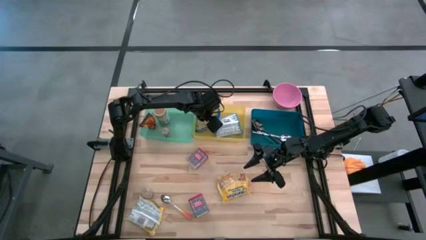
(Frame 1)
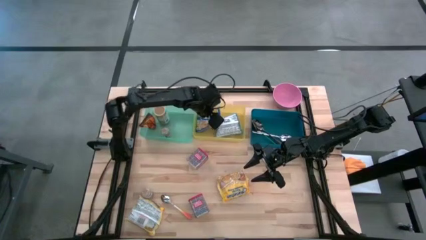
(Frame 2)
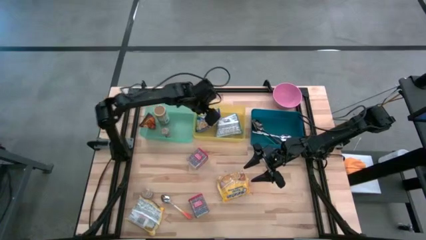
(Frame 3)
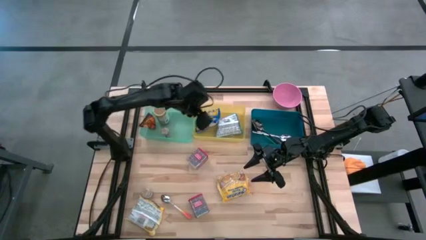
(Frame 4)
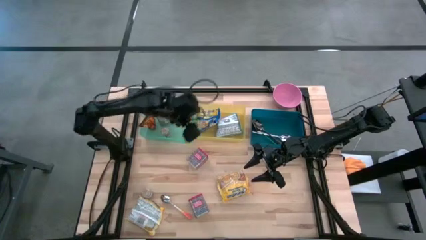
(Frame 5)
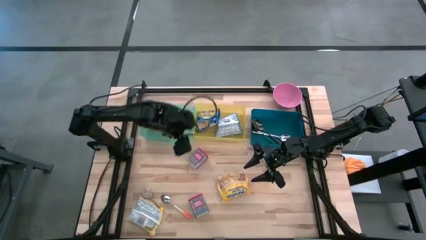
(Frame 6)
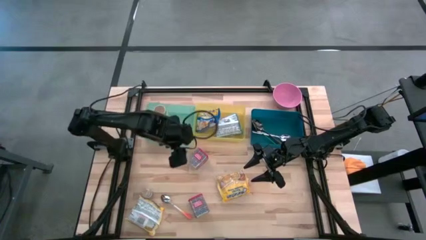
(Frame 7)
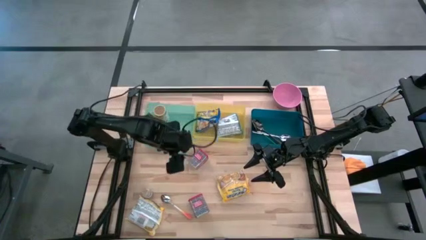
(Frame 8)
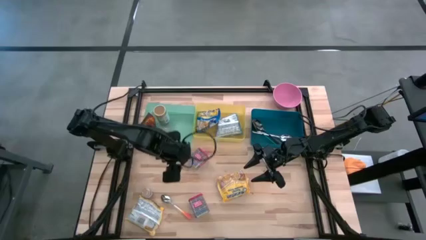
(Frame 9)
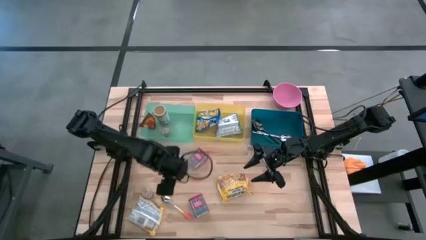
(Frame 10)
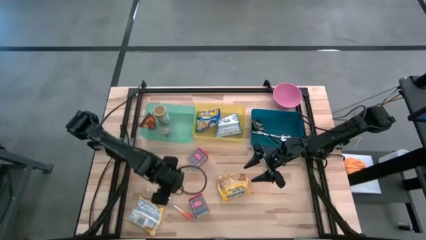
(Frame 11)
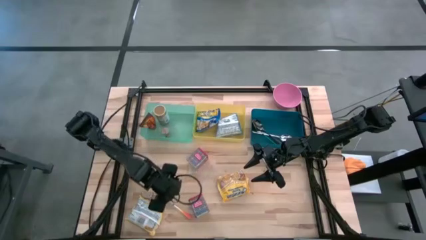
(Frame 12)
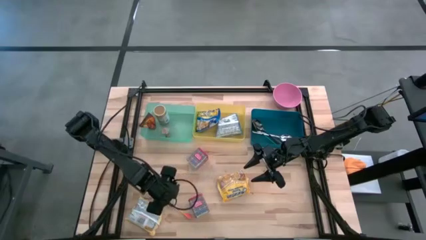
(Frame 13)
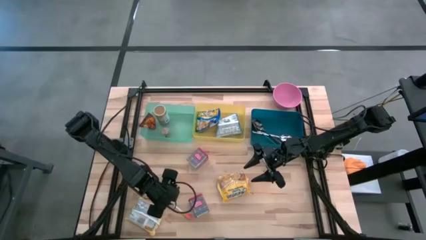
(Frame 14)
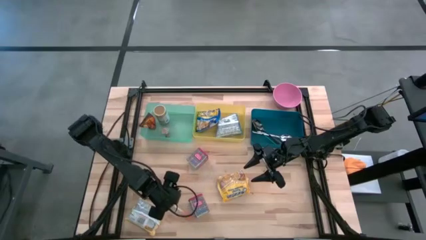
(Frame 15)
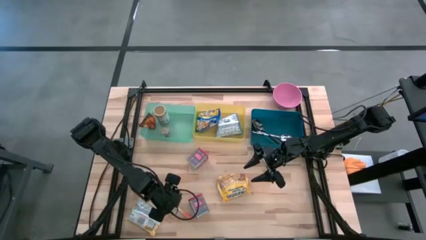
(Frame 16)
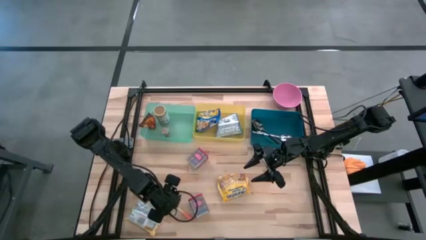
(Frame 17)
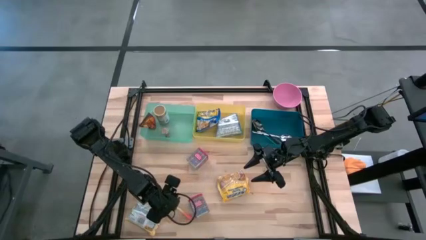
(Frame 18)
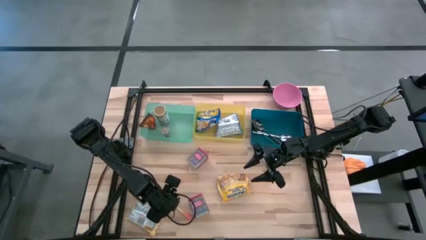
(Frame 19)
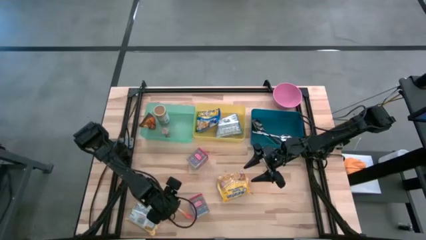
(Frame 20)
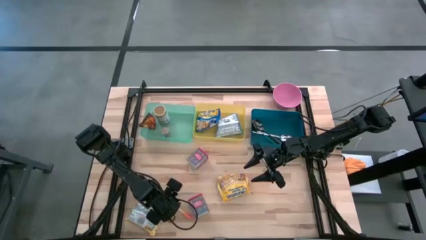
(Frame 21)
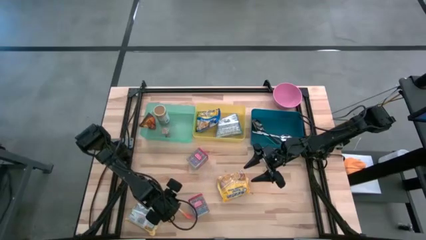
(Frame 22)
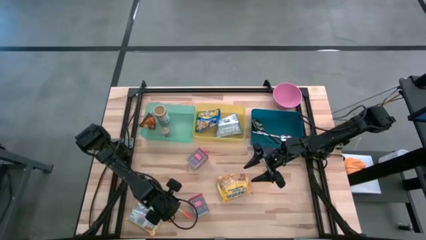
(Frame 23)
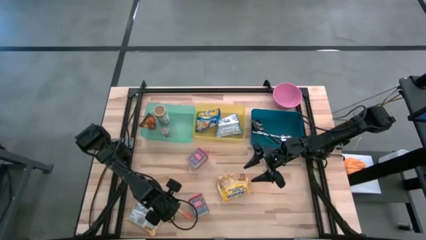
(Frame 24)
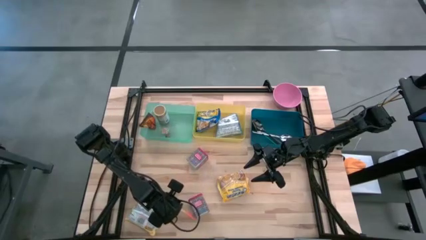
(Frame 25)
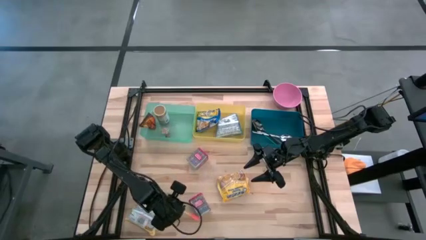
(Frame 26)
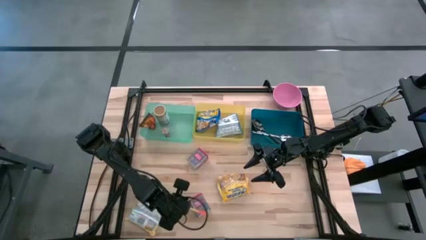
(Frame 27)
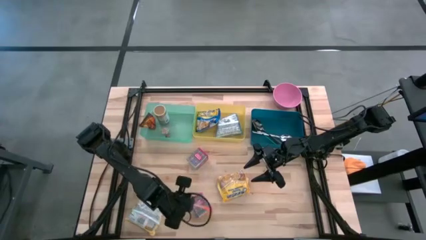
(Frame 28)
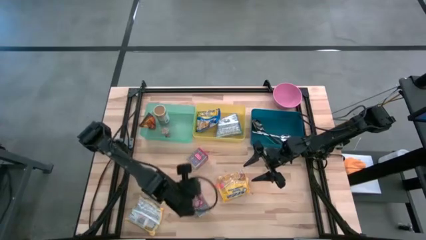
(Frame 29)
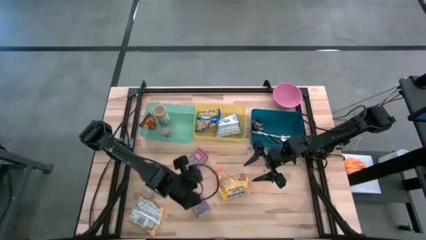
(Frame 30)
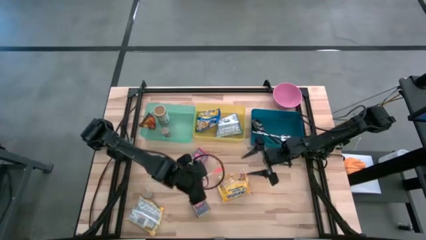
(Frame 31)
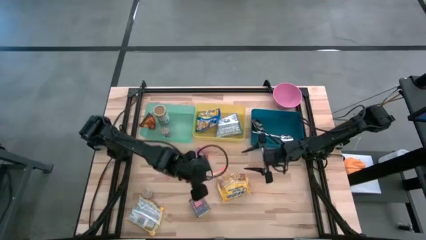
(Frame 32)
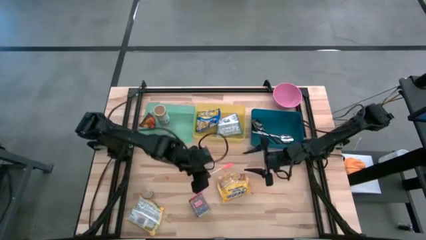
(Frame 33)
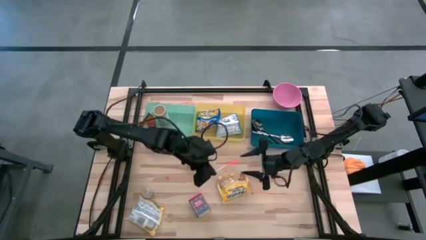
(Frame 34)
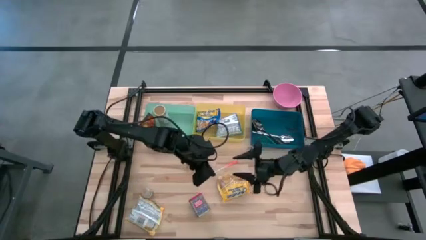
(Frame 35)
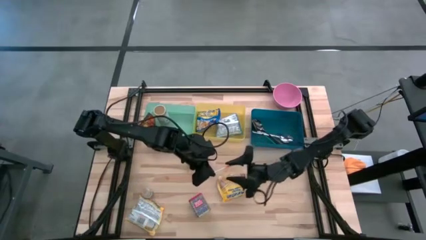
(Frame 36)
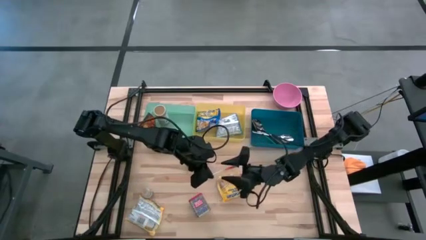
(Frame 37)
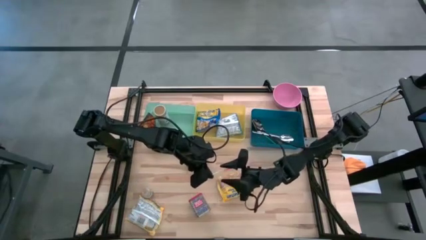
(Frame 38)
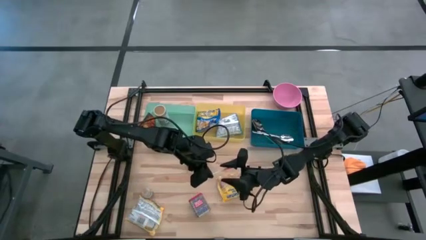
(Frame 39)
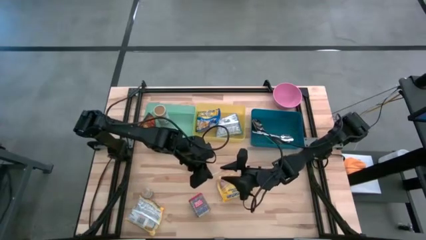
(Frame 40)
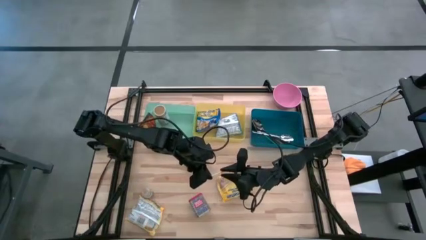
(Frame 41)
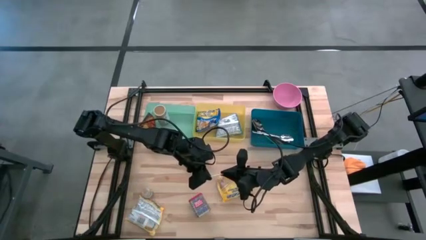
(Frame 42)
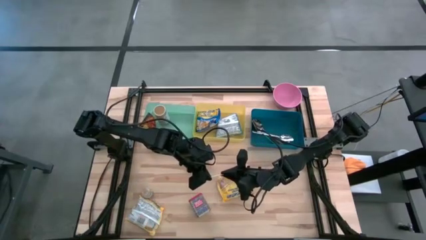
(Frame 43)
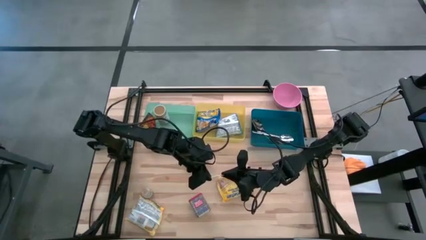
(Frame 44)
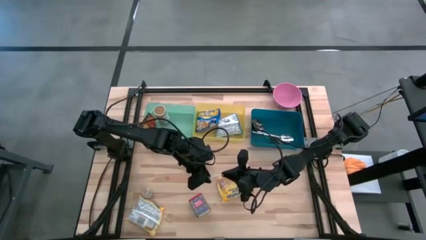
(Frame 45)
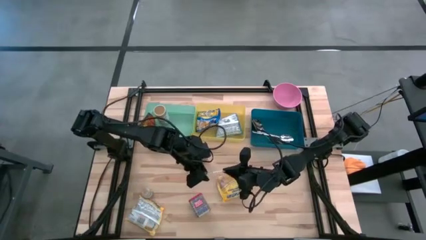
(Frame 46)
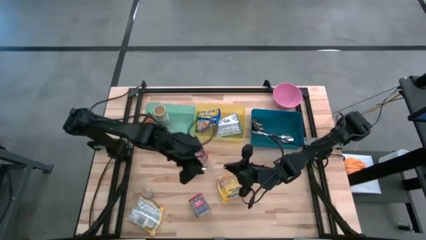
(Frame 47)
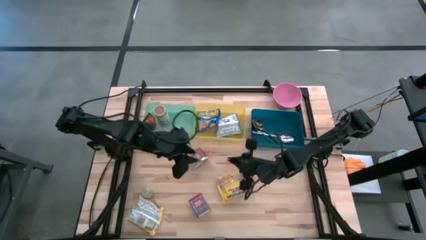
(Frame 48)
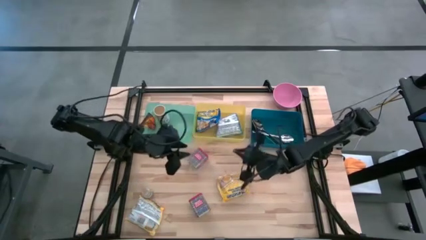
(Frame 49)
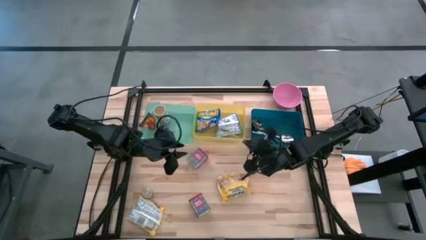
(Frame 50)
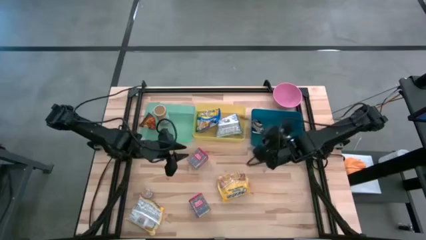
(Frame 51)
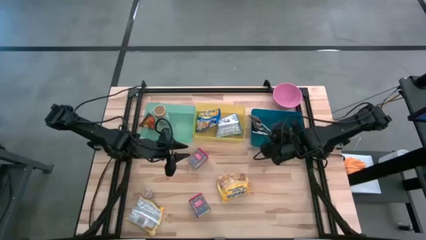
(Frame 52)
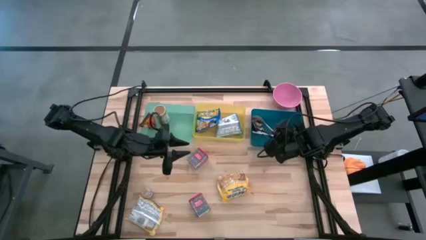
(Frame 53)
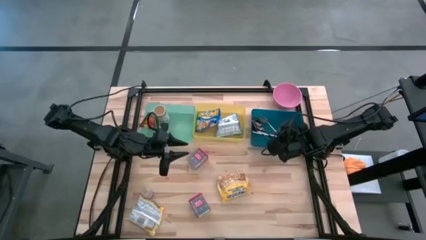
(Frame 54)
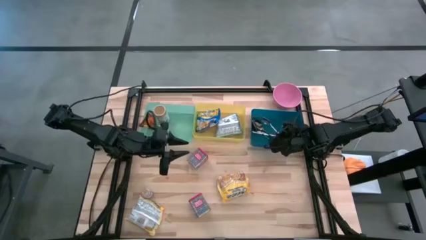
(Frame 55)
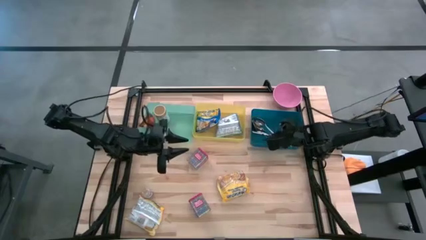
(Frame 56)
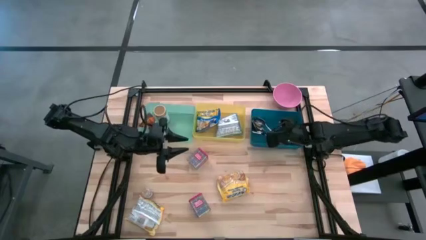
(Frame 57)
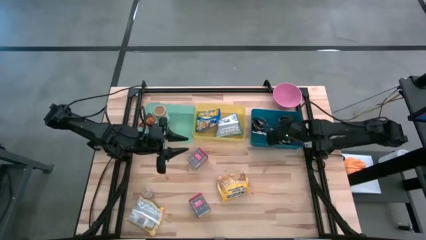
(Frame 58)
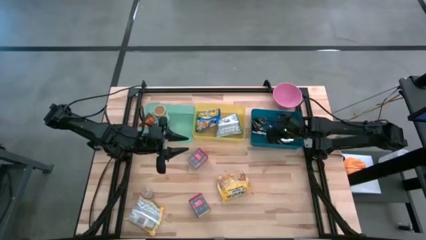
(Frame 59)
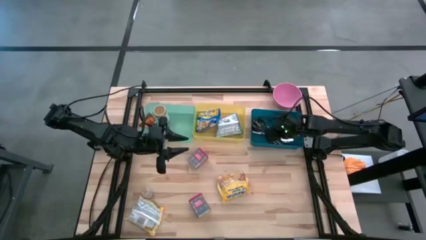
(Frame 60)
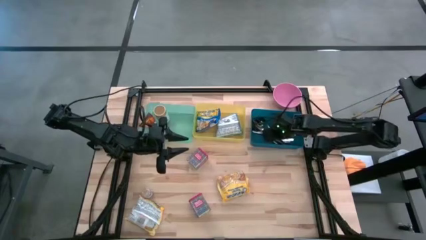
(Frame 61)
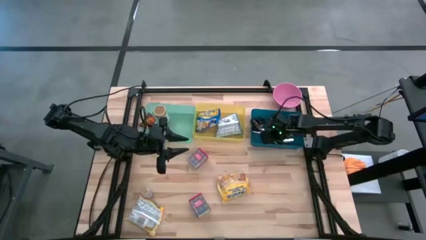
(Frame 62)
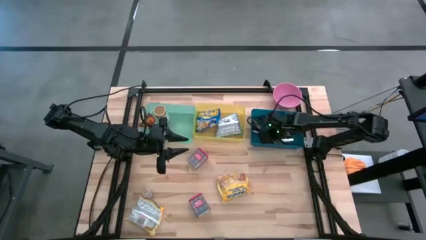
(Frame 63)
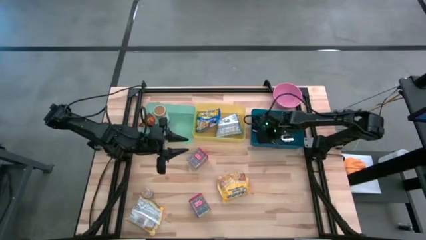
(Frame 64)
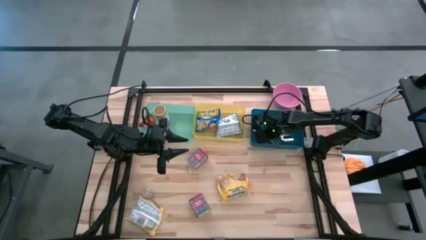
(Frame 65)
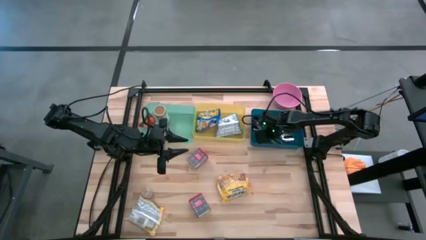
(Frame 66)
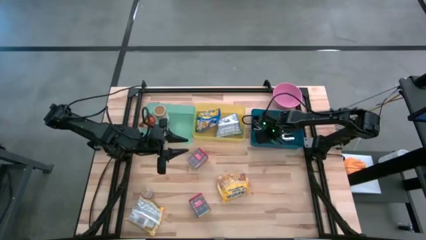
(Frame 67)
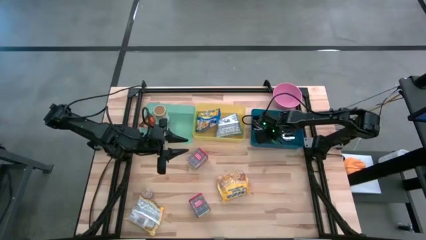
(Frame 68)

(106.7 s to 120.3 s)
Put the orange spoon into the blue bin
